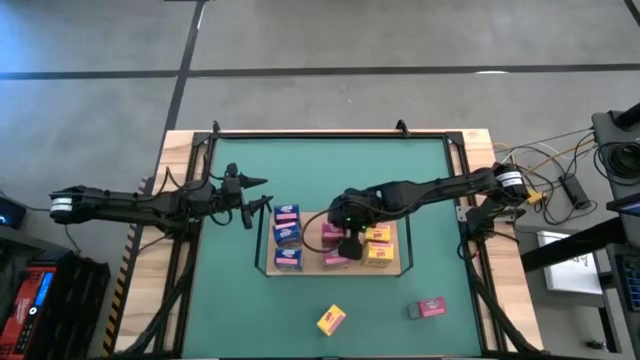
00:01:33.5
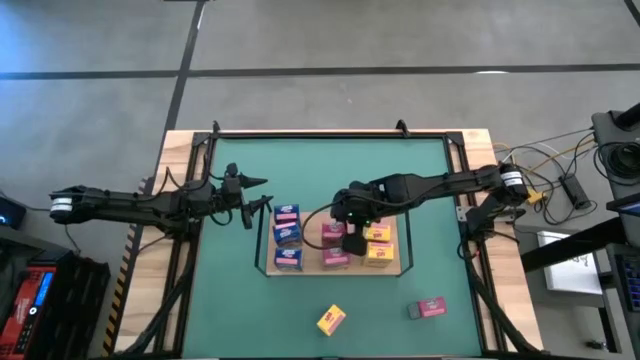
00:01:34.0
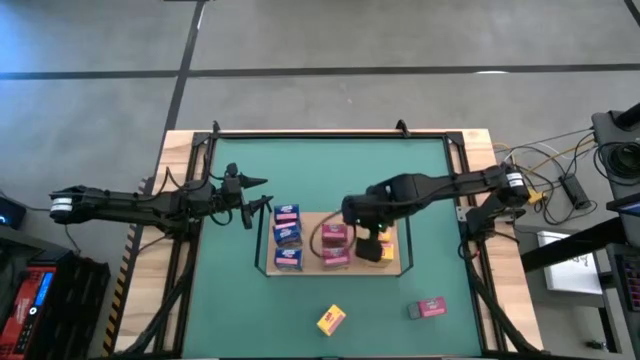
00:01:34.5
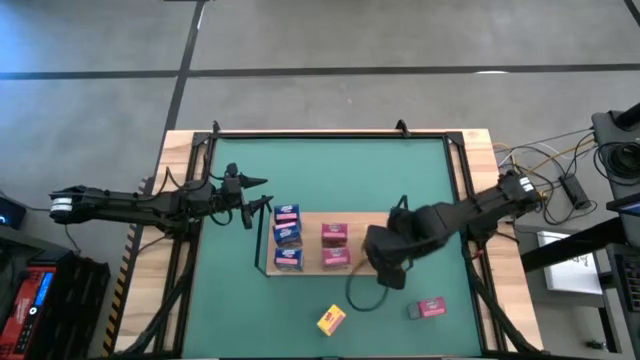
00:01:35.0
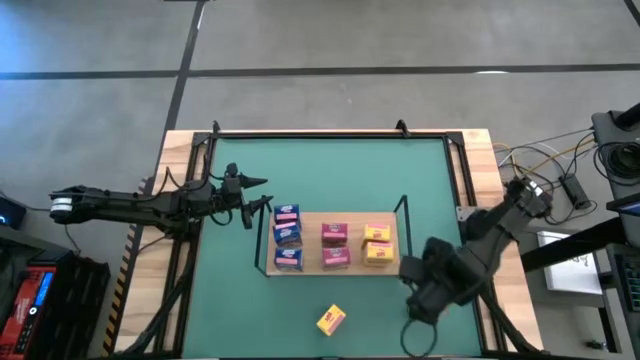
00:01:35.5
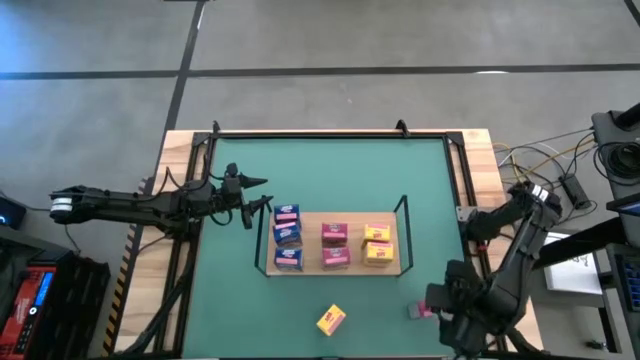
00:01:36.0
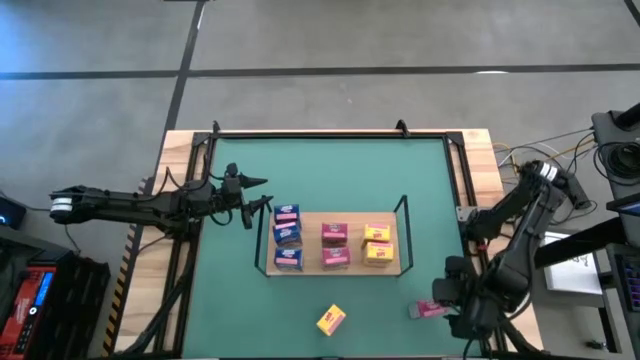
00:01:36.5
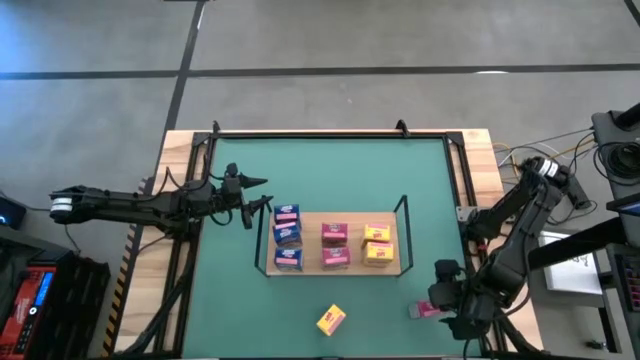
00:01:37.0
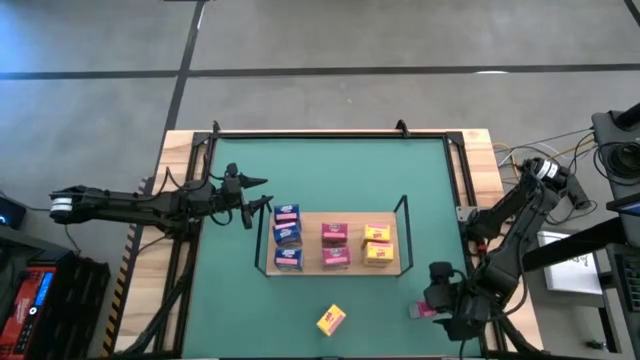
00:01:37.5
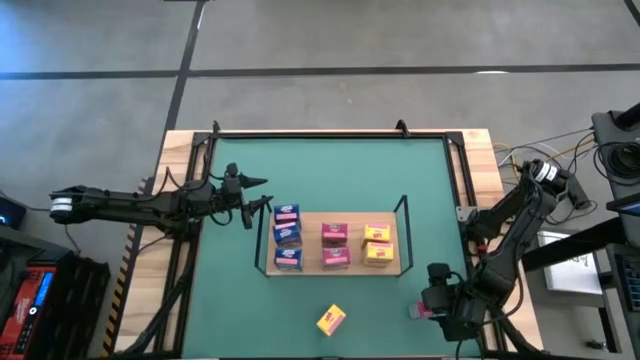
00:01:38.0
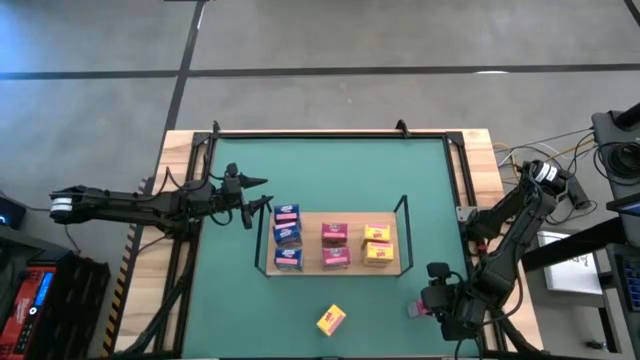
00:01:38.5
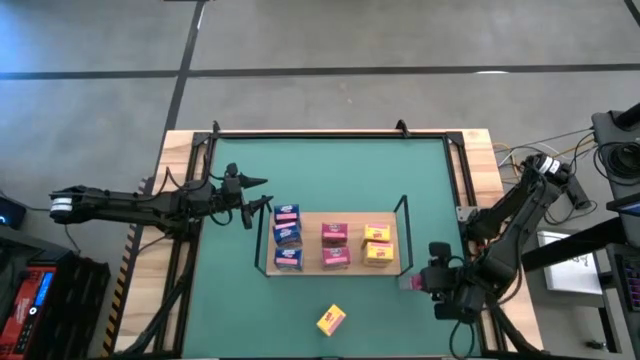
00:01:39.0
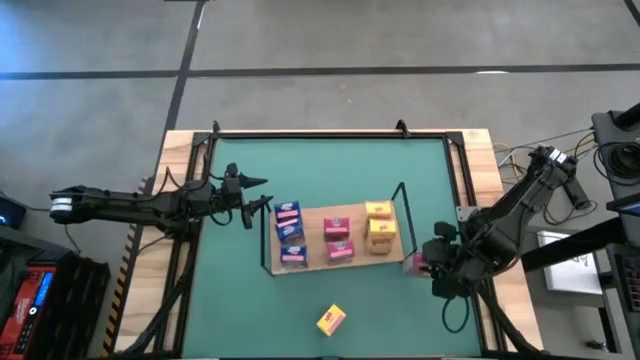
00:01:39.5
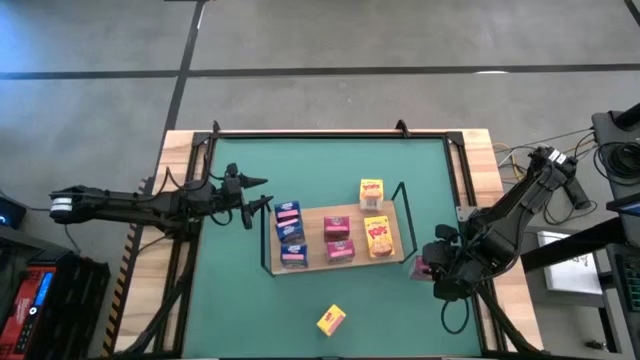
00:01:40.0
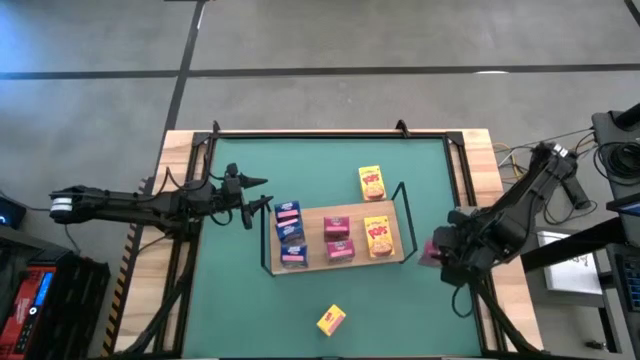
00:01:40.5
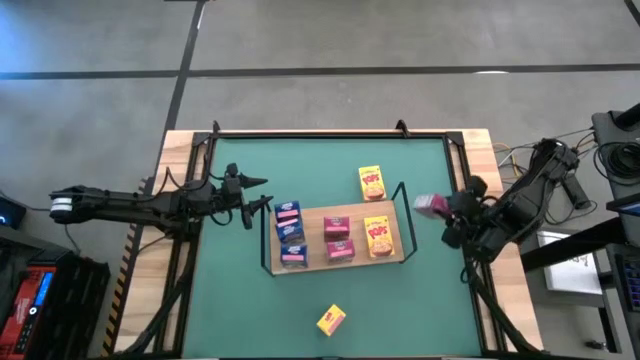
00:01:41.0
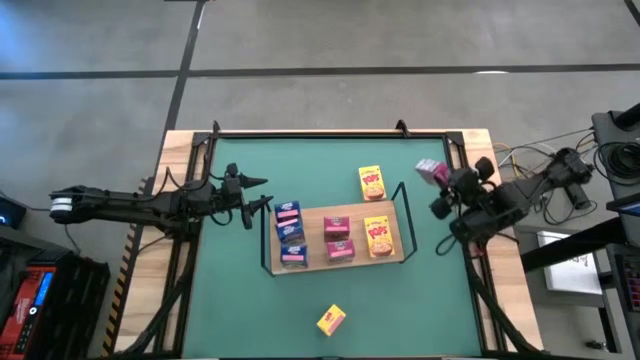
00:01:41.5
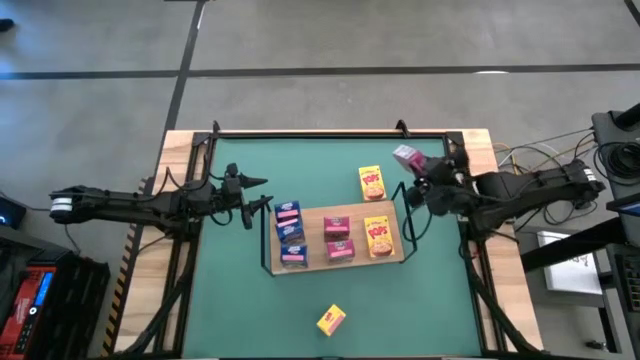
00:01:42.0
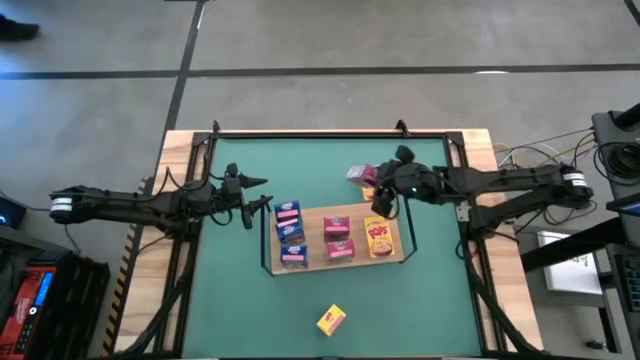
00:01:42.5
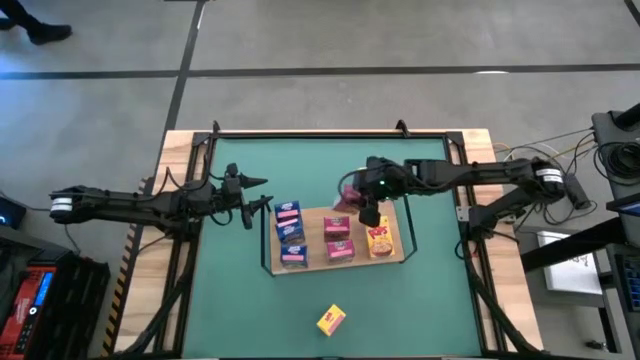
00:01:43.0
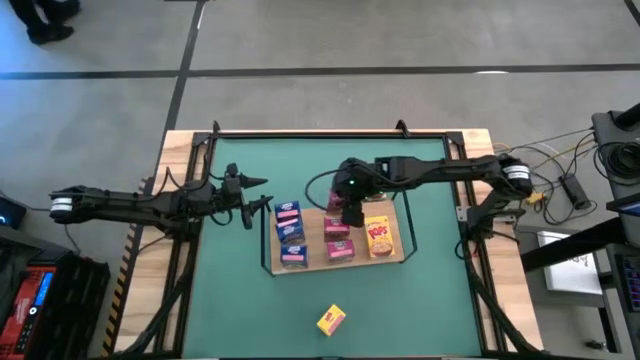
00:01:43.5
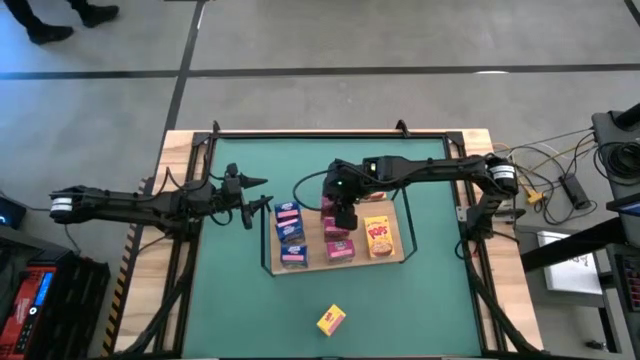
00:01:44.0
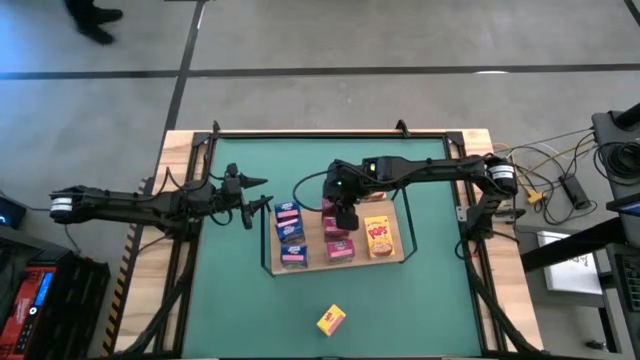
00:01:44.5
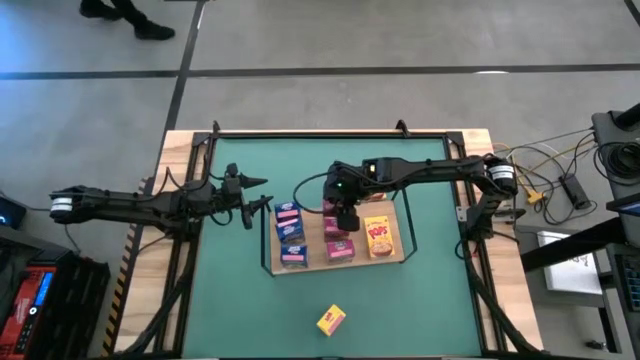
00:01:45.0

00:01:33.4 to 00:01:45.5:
Task: Stack cereal on shelf
Put the pink cereal box on the shelf aligned with the other pink cereal box

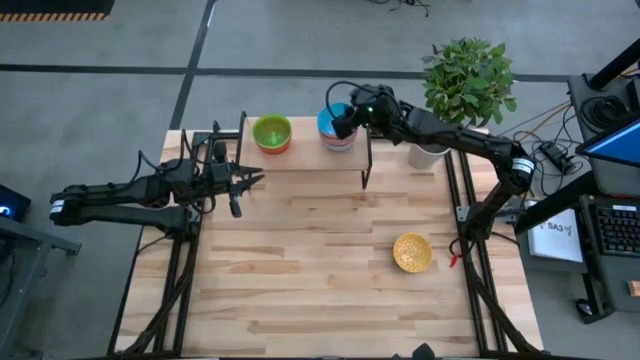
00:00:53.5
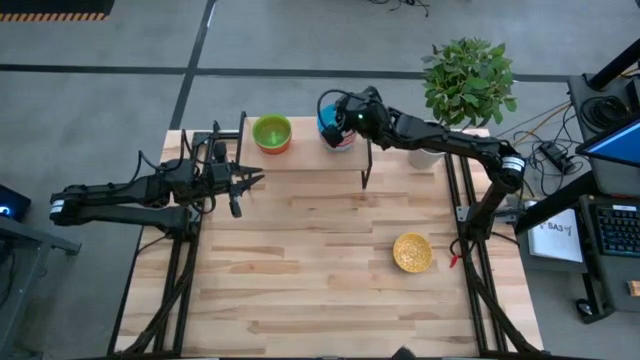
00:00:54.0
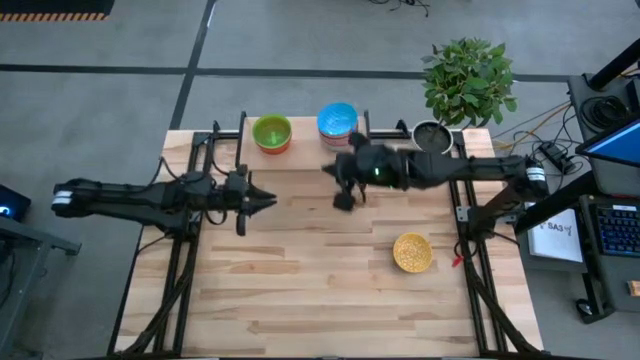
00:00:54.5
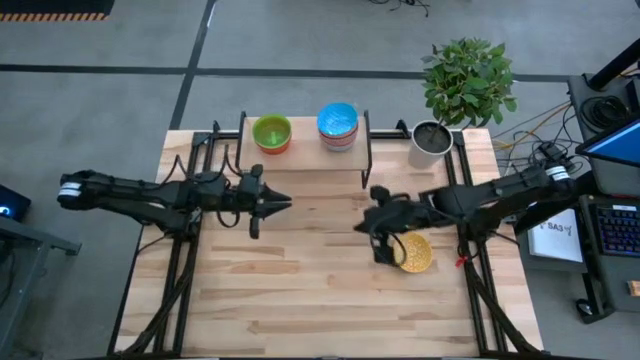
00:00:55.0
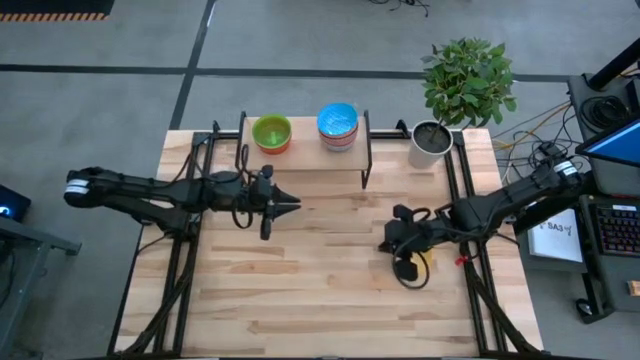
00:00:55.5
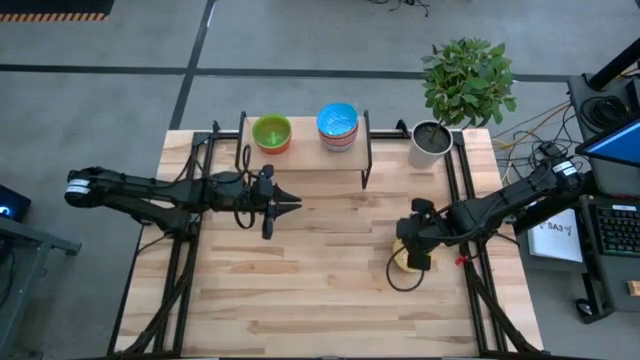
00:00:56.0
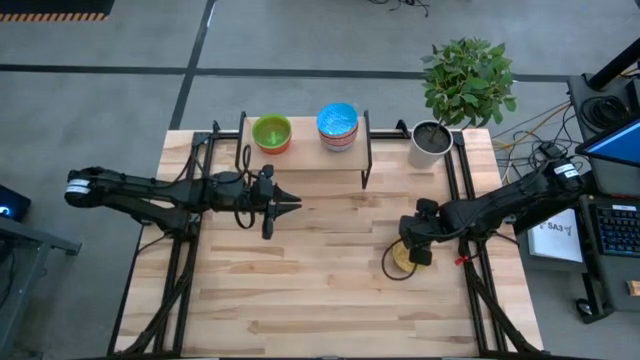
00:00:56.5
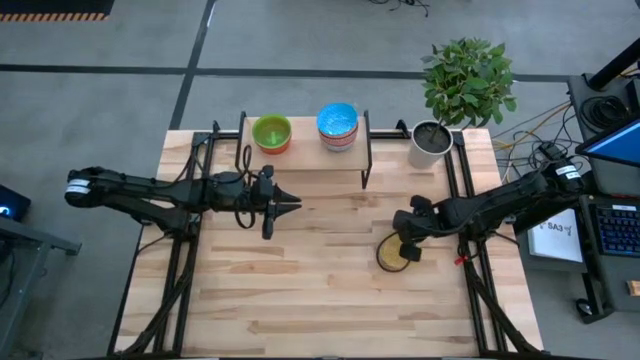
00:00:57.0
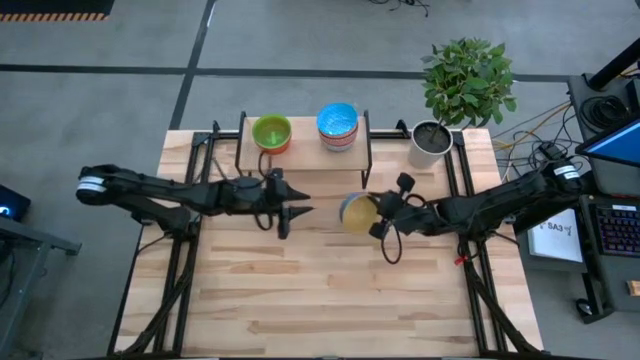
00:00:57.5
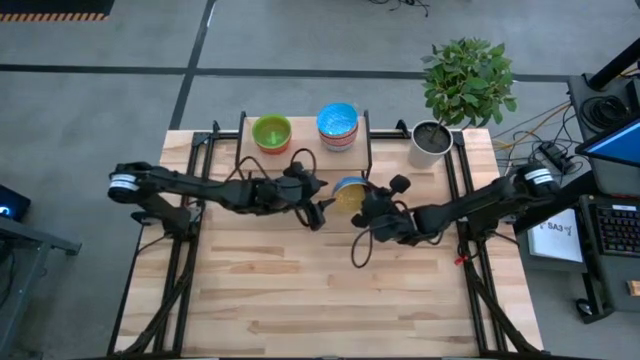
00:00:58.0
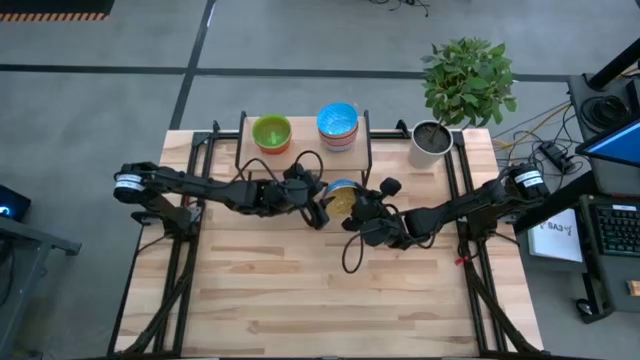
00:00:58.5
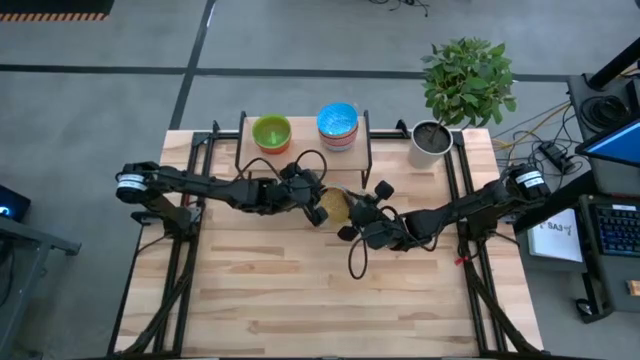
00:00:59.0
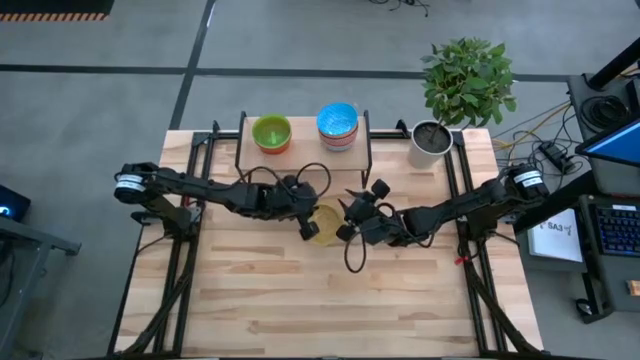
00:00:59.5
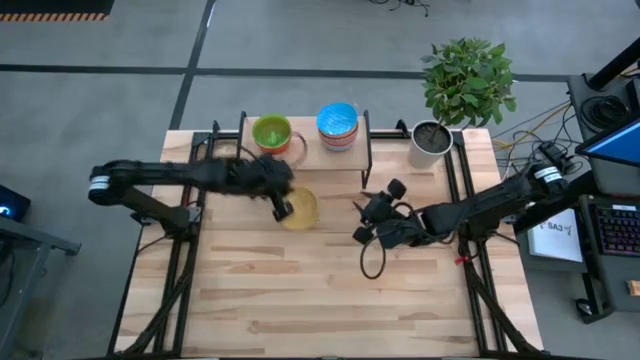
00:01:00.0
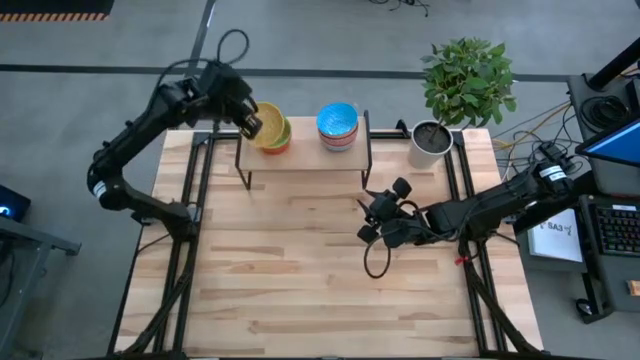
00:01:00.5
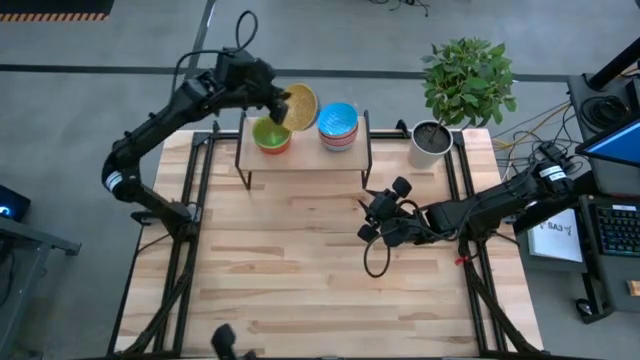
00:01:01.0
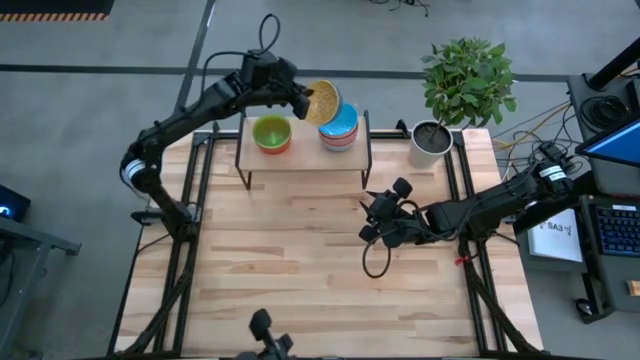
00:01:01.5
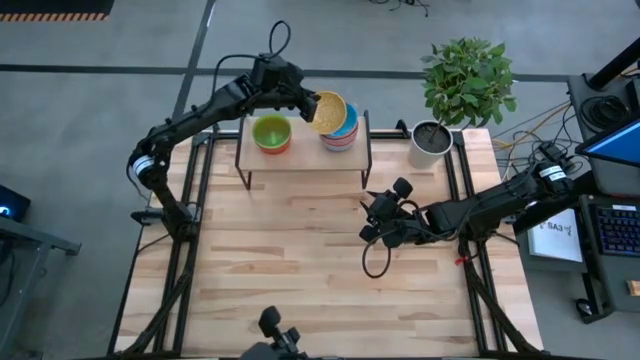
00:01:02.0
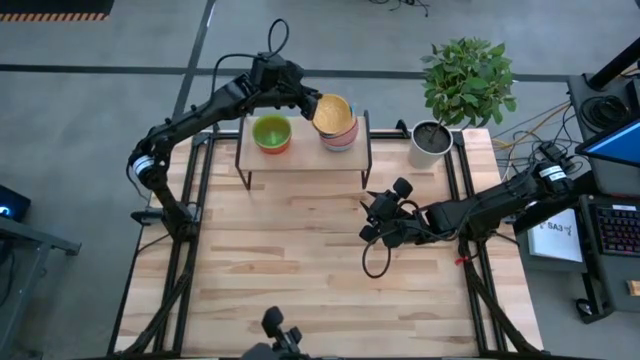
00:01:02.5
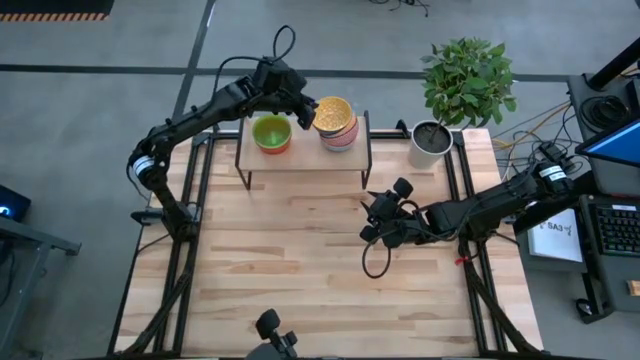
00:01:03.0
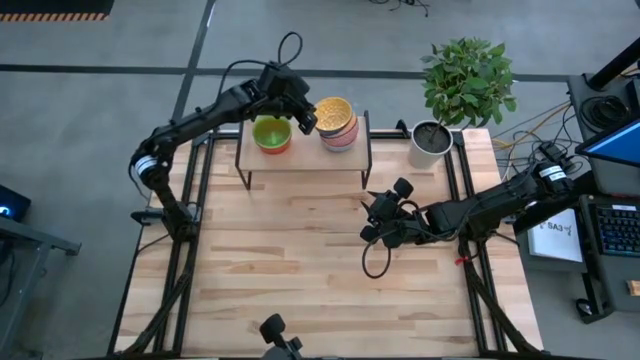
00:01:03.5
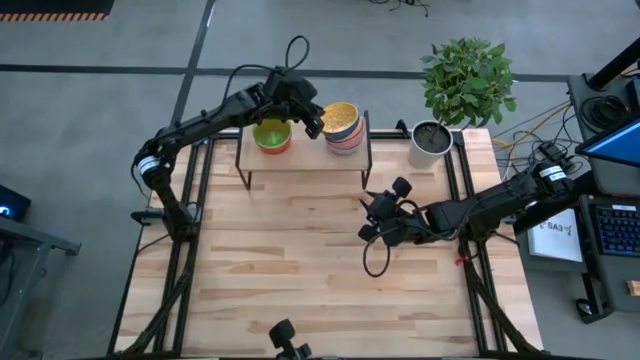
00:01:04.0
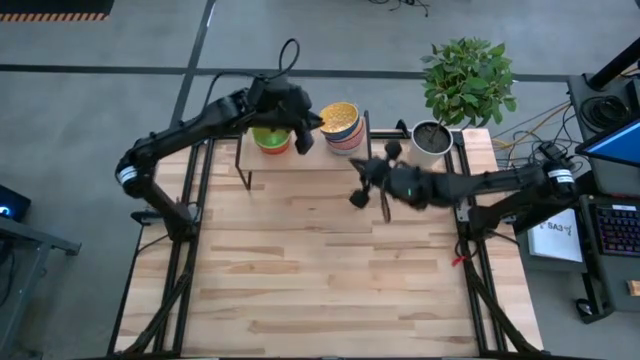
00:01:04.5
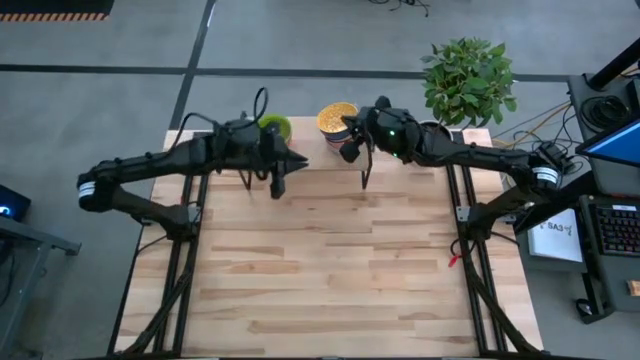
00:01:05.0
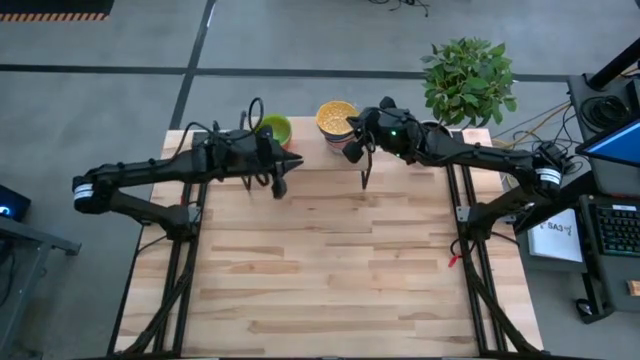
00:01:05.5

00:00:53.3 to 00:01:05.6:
Task: Place and stack bowls onto a shelf
Stack the yellow patterned bowl on top of the light blue patterned bowl on the shelf
